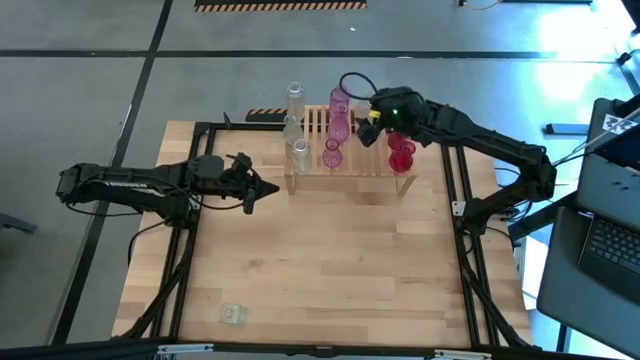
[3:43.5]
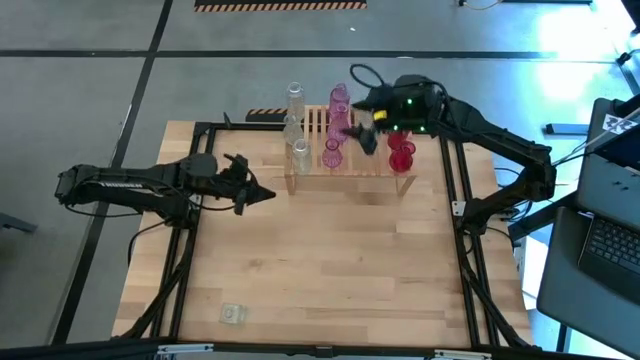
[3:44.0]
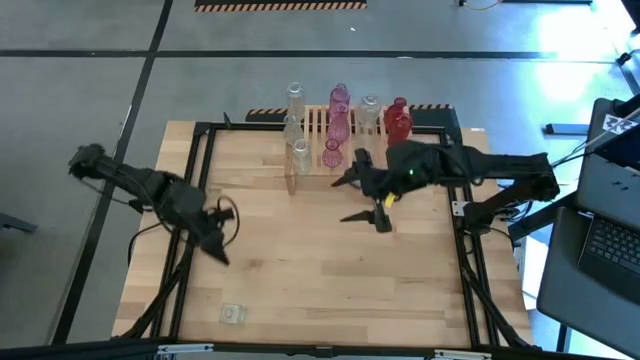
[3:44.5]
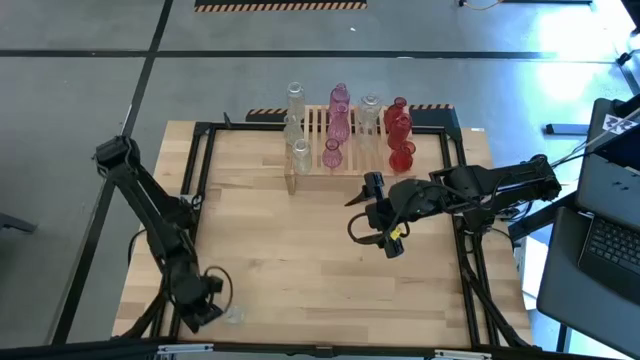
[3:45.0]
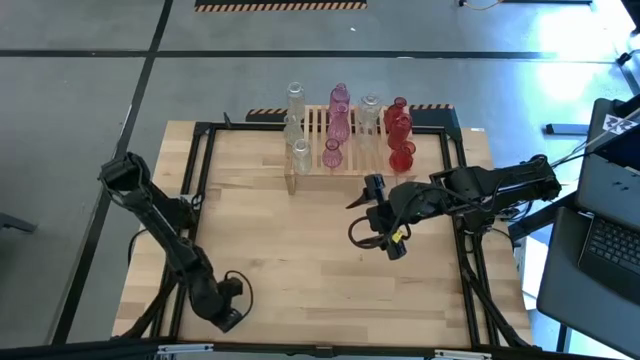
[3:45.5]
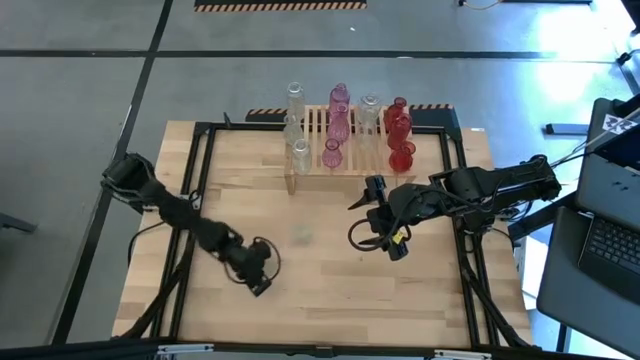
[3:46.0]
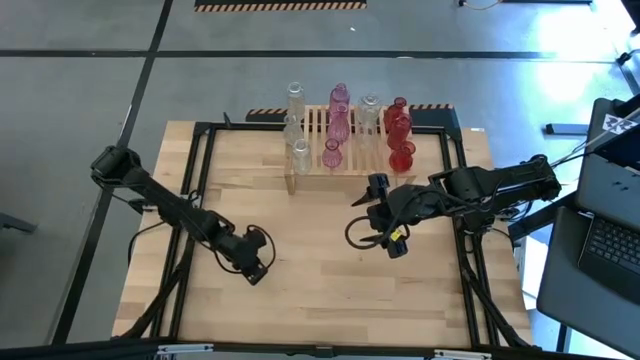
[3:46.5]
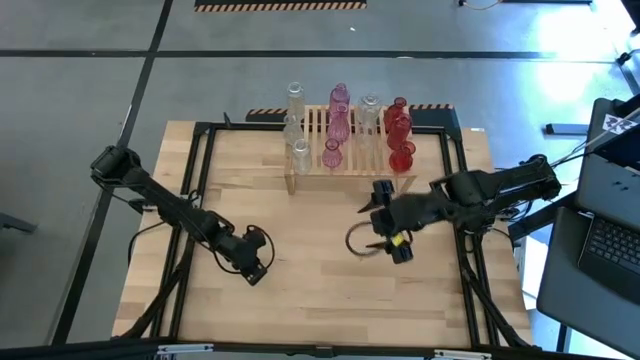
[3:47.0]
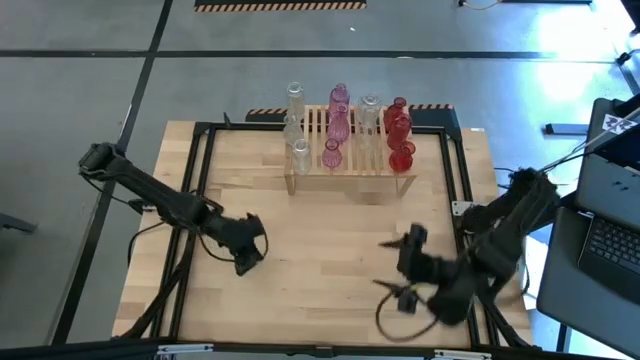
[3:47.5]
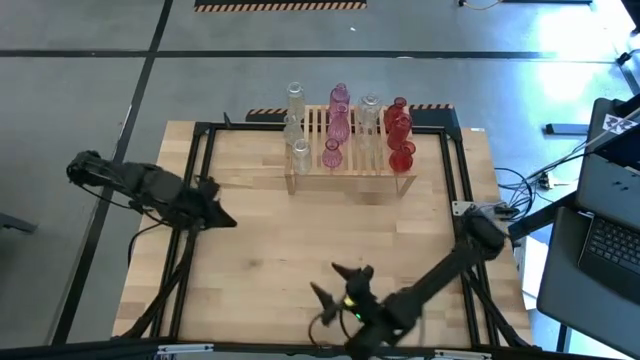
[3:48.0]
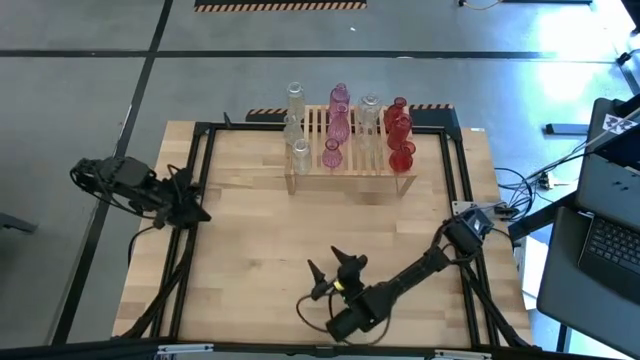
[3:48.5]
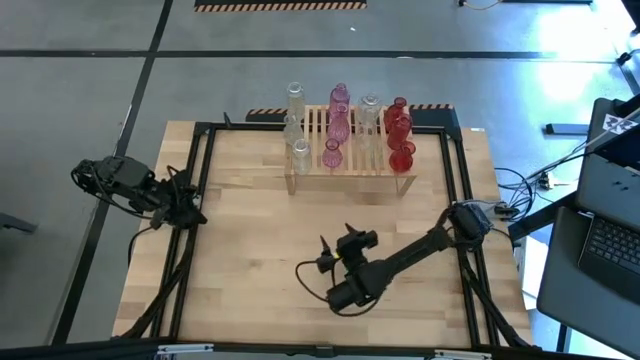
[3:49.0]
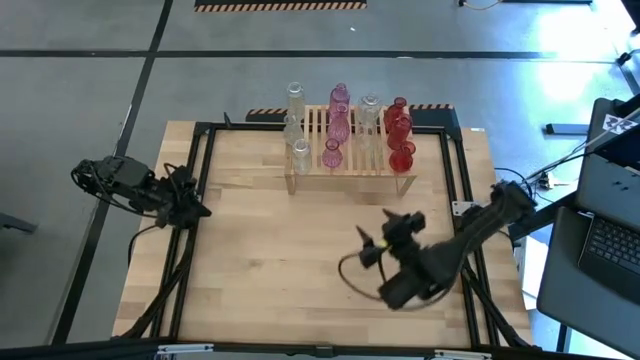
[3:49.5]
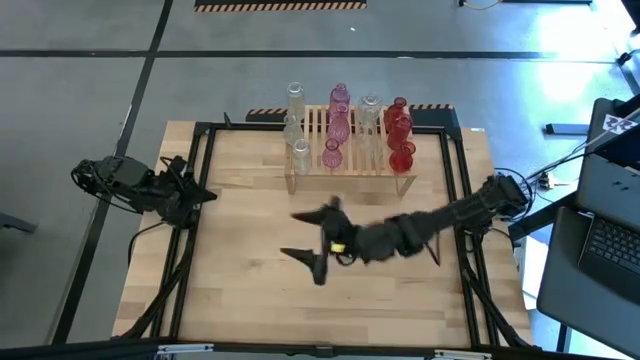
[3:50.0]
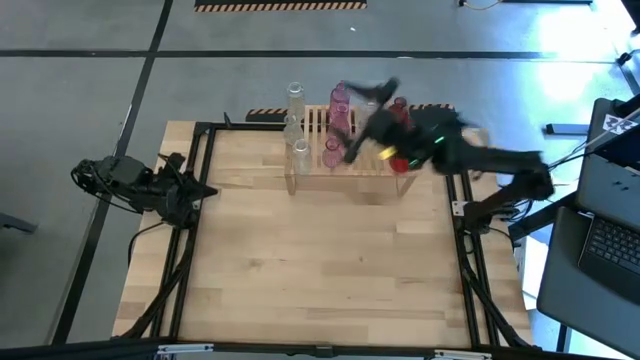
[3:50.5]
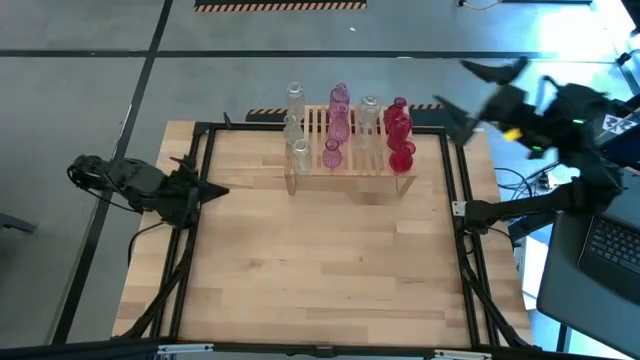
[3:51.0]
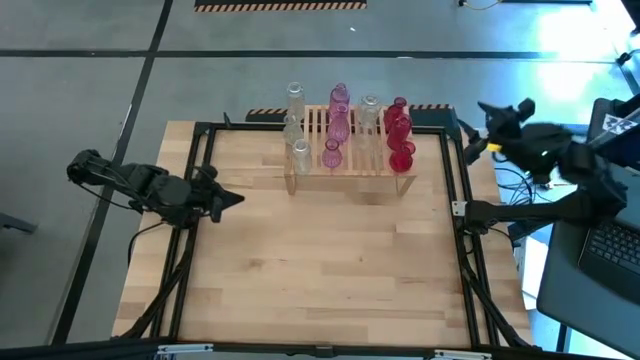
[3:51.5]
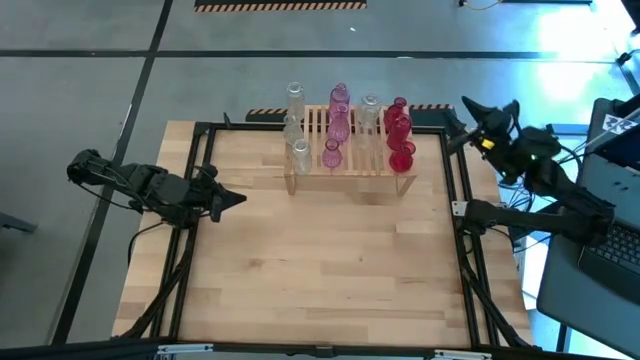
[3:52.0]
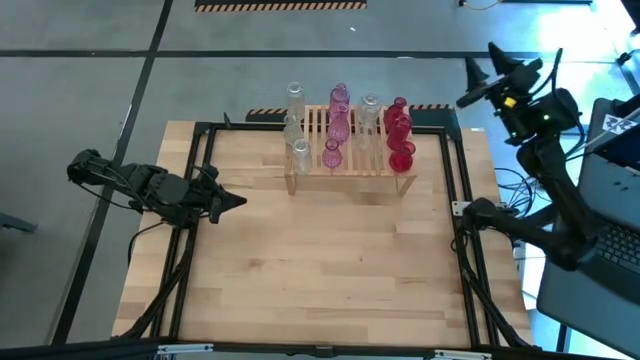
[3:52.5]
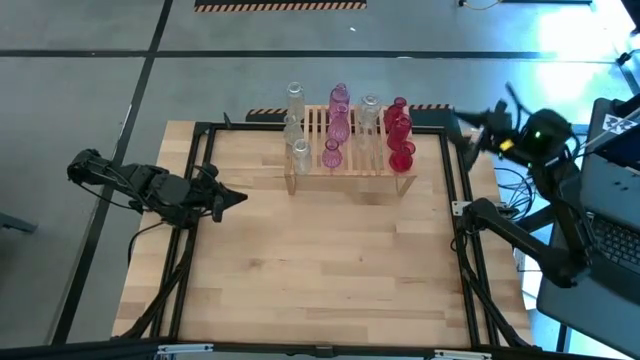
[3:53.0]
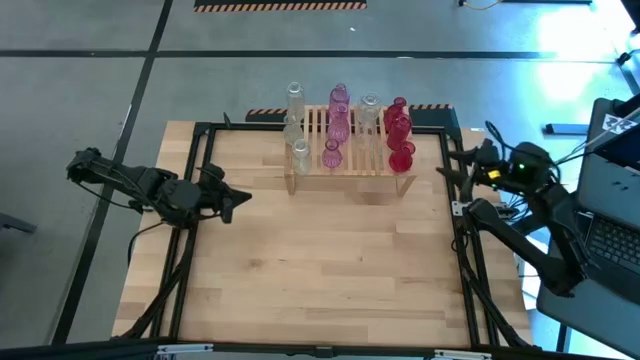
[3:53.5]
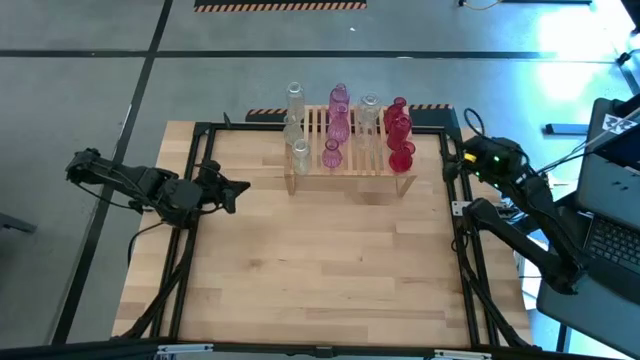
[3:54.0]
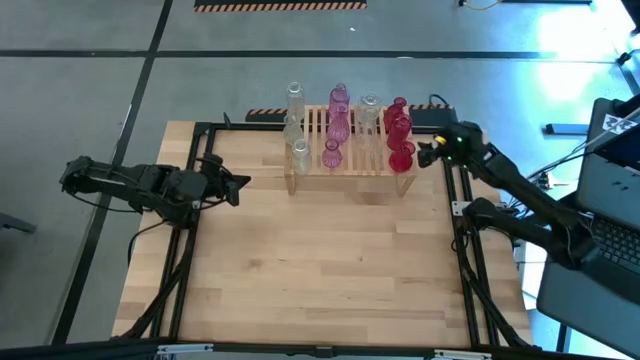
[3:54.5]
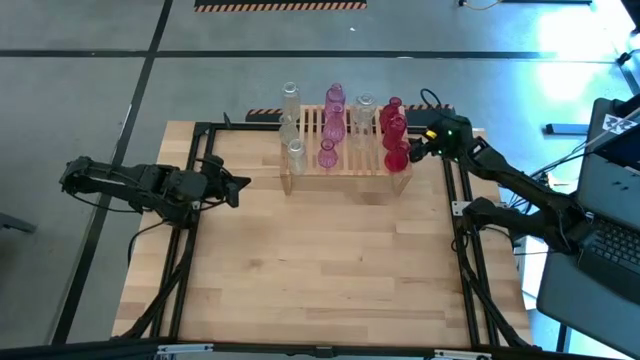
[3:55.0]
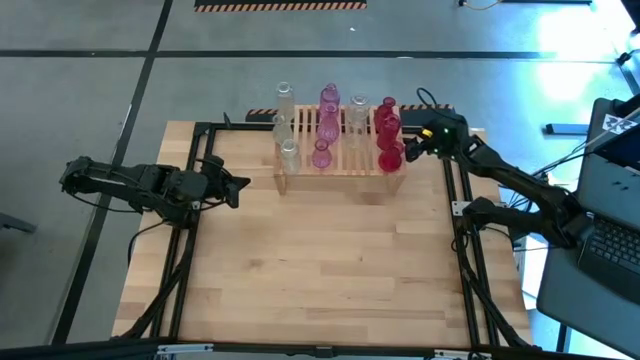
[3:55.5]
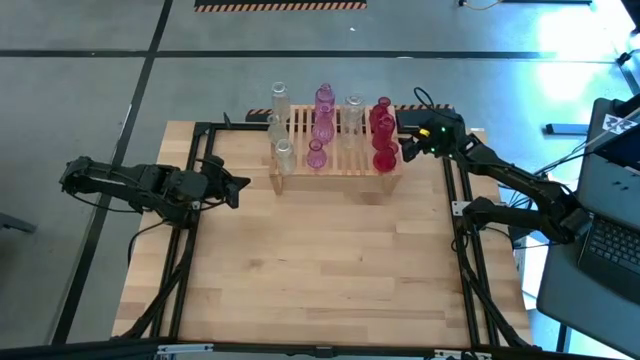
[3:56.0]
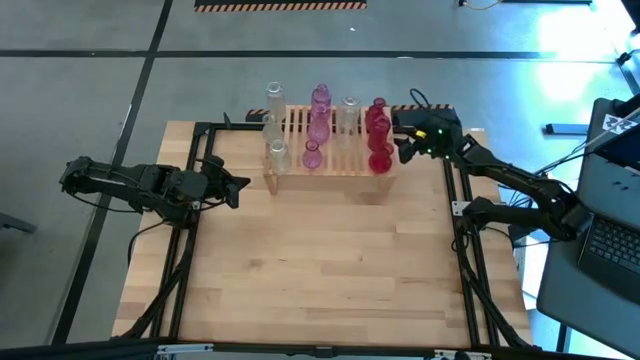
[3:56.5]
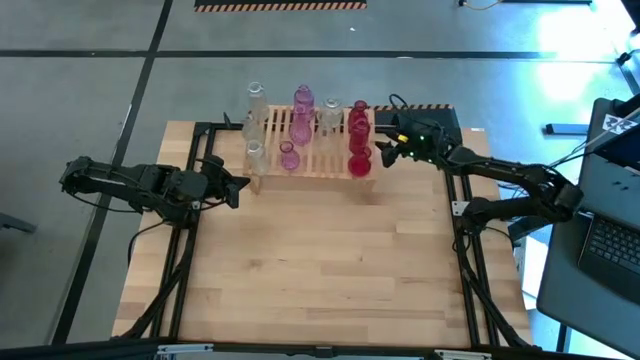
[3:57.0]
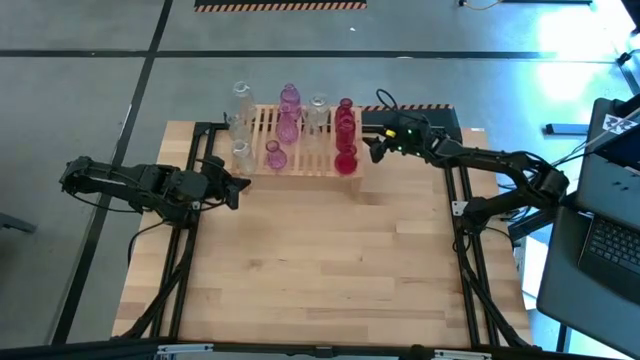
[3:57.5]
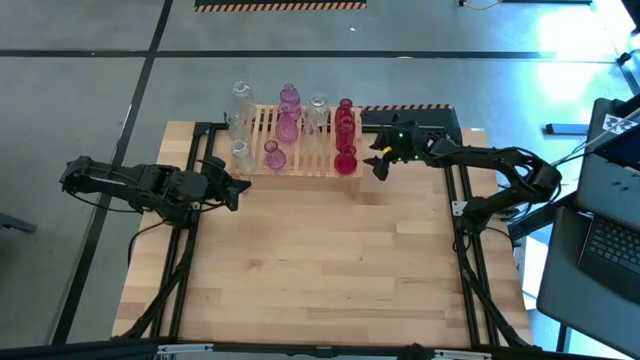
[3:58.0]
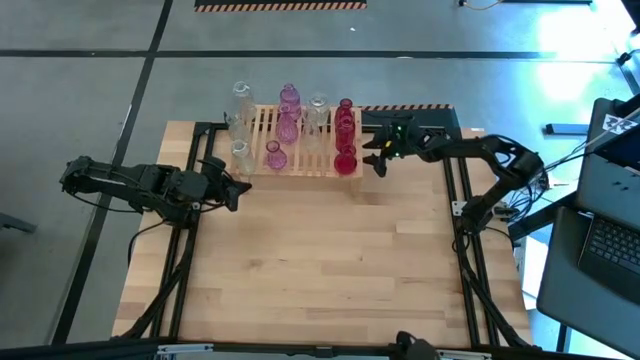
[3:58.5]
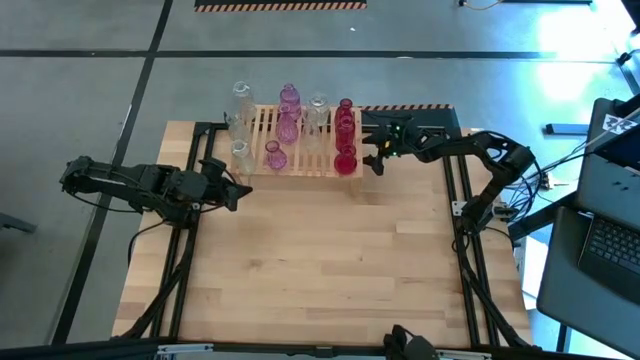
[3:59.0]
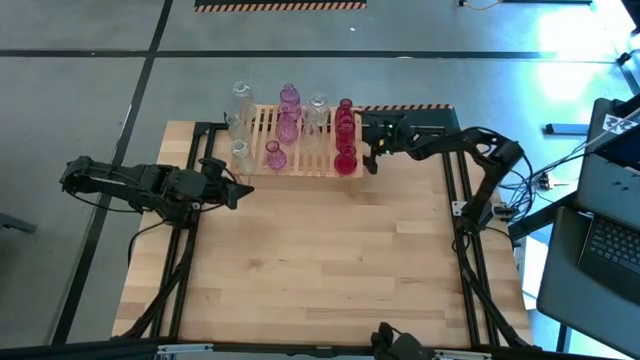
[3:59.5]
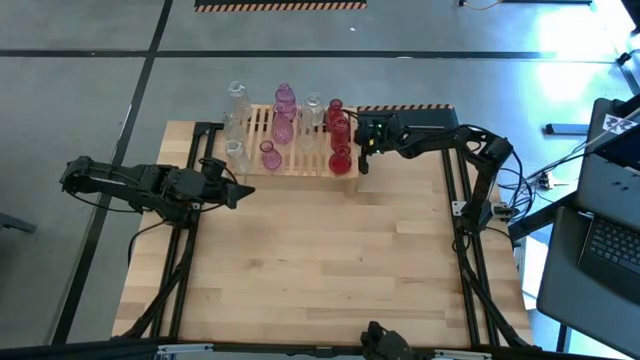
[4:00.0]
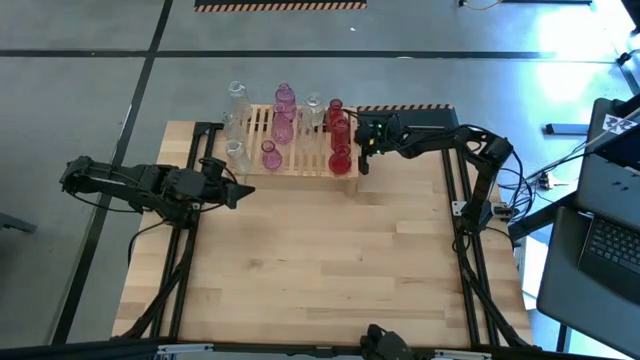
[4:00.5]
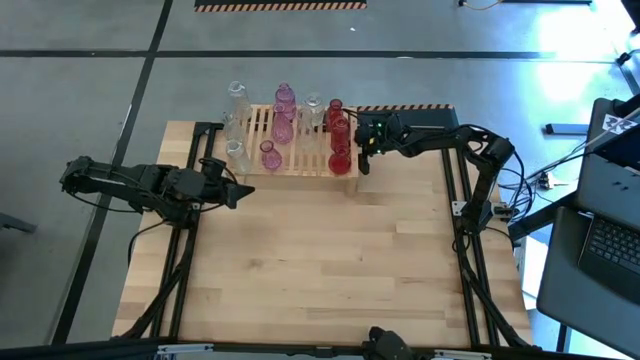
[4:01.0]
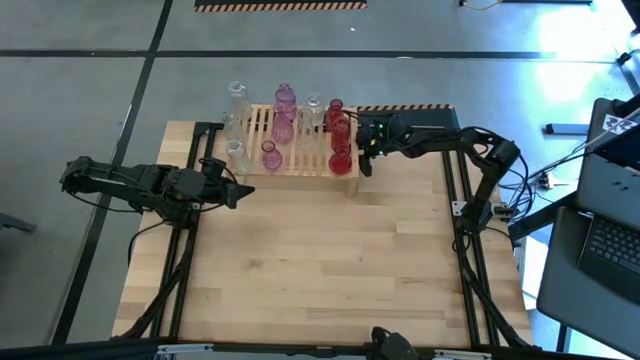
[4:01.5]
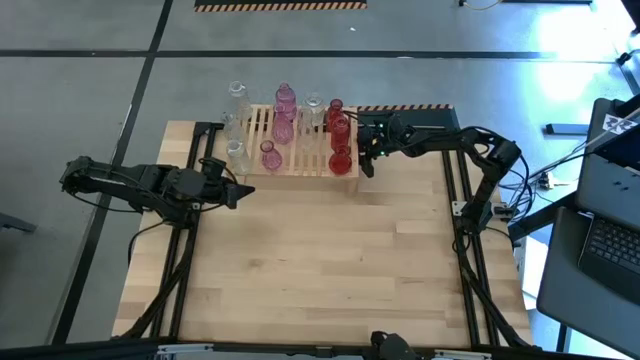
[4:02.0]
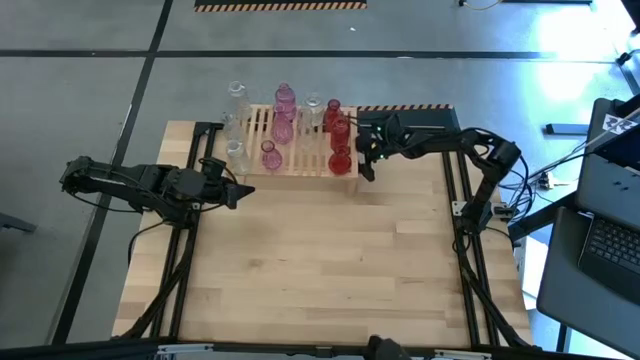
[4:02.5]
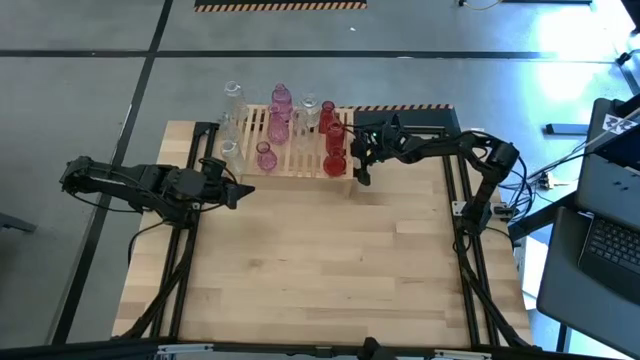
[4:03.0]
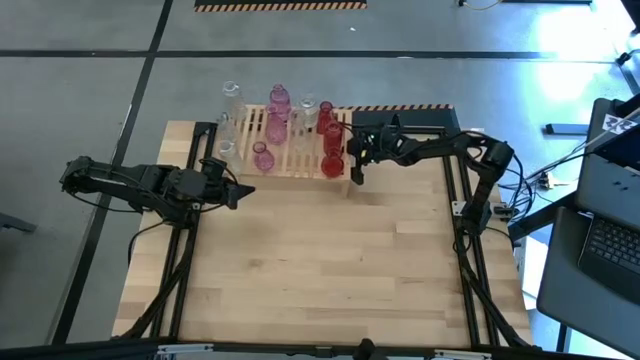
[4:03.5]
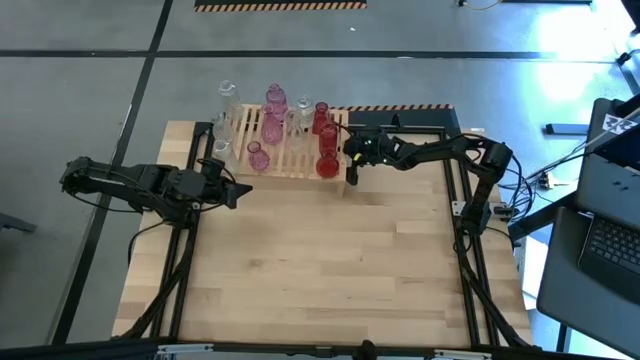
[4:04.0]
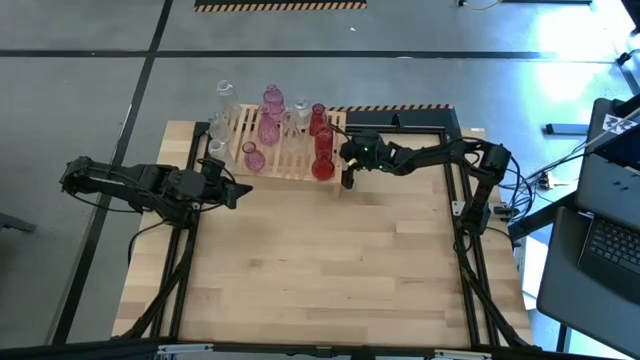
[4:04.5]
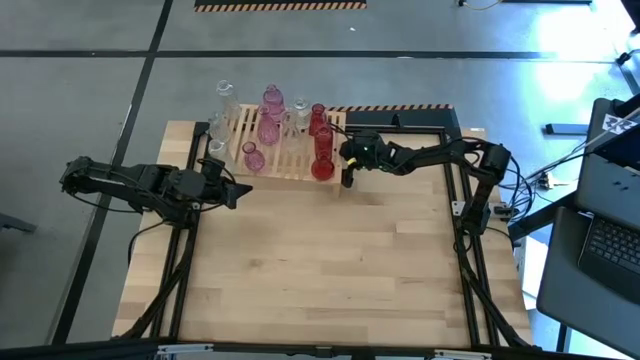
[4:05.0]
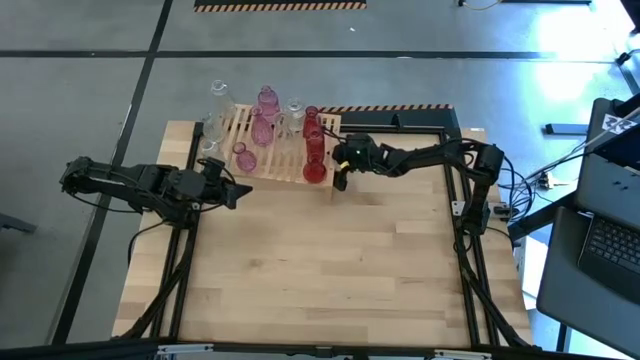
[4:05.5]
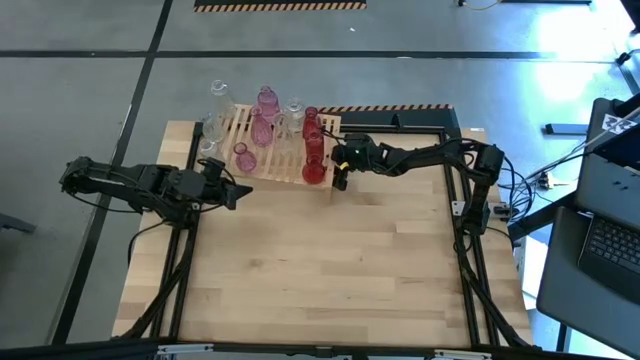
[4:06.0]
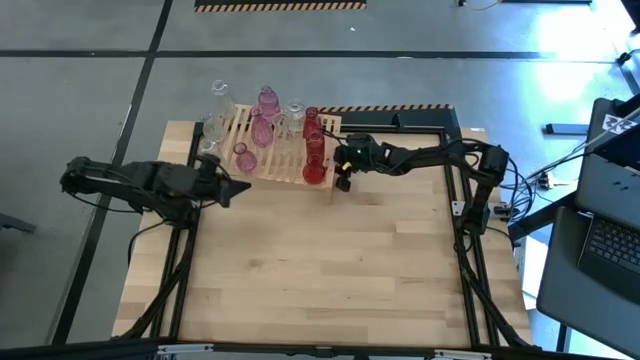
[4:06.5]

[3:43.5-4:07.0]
Task: sort vases onto shelf
Put the transparent vase on the shelf aligned with the other transparent vase
